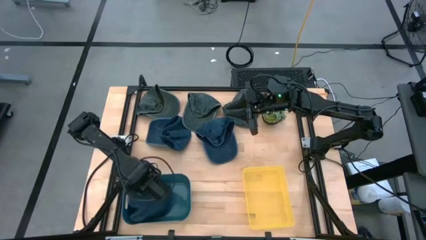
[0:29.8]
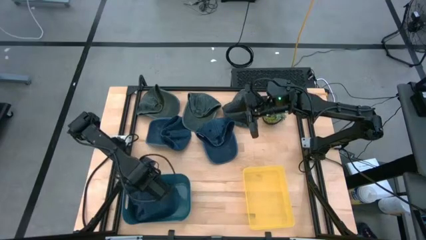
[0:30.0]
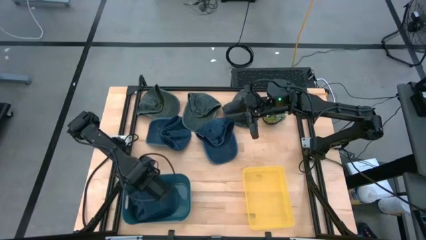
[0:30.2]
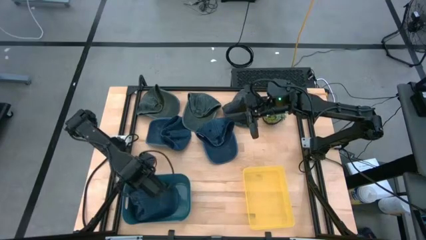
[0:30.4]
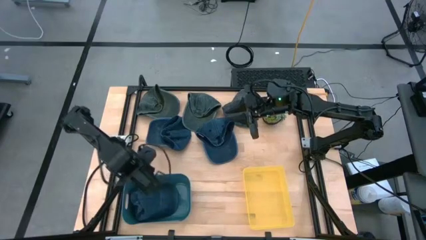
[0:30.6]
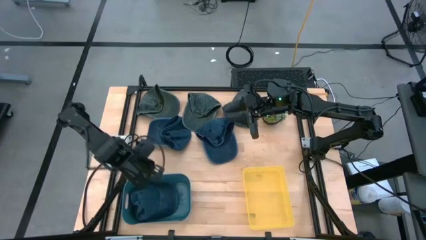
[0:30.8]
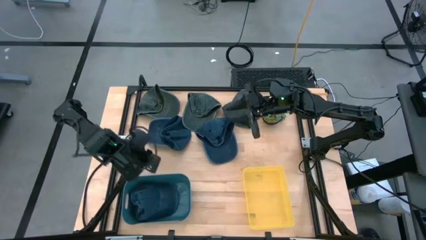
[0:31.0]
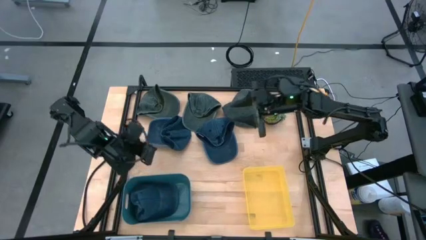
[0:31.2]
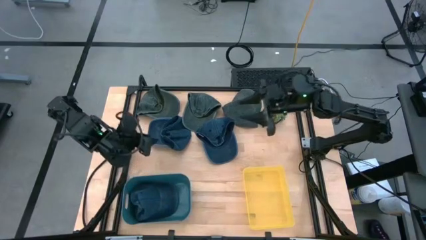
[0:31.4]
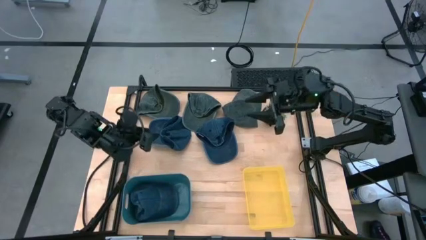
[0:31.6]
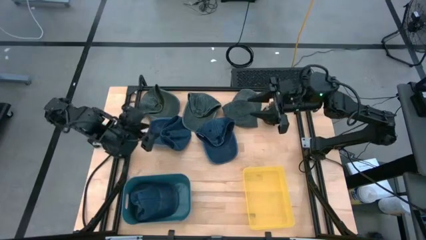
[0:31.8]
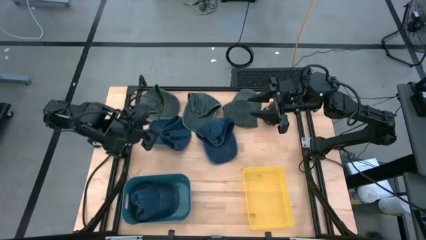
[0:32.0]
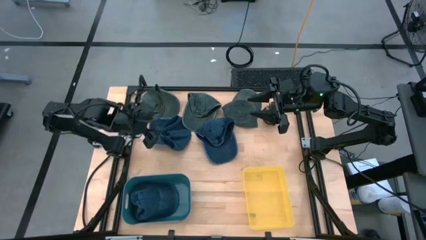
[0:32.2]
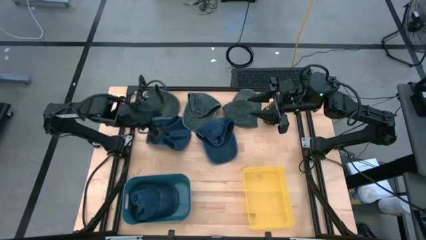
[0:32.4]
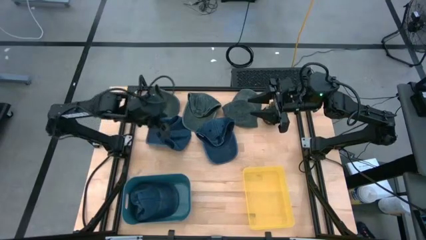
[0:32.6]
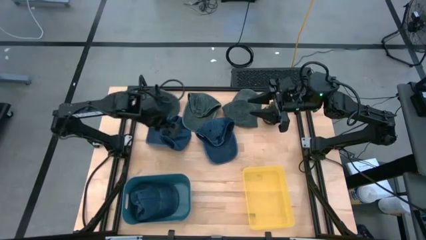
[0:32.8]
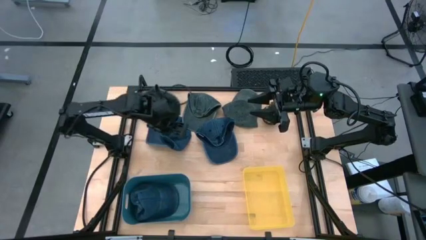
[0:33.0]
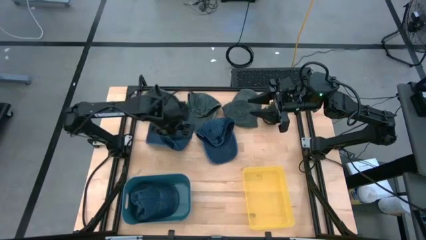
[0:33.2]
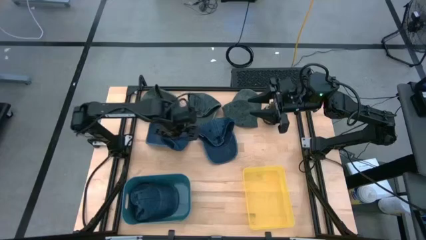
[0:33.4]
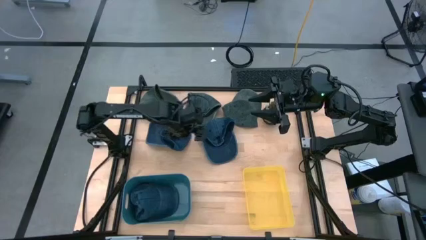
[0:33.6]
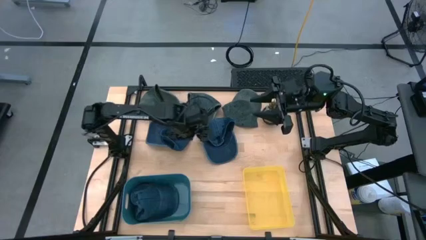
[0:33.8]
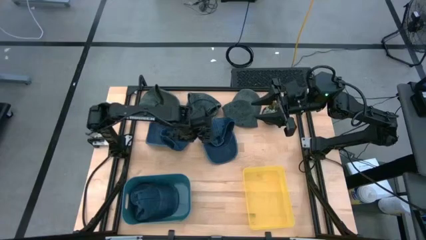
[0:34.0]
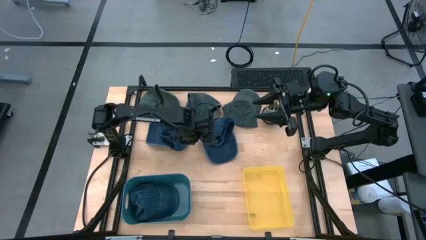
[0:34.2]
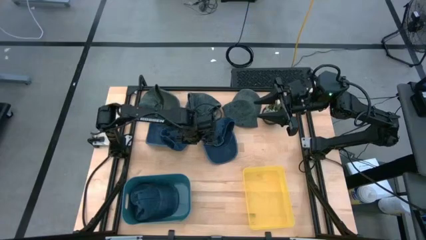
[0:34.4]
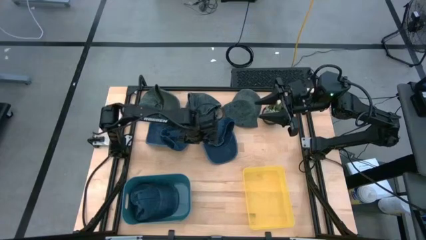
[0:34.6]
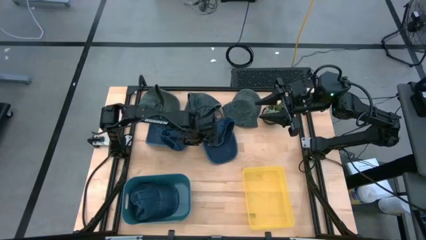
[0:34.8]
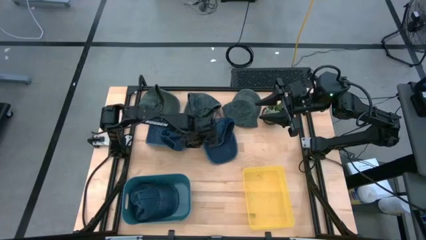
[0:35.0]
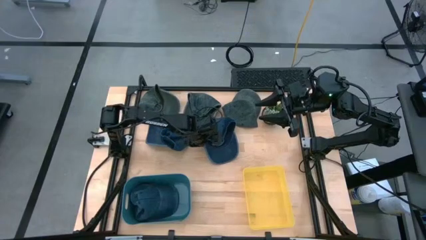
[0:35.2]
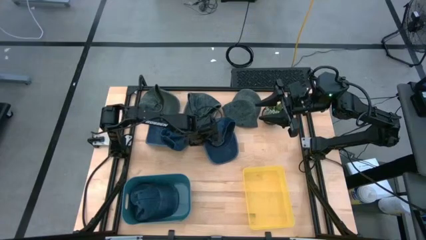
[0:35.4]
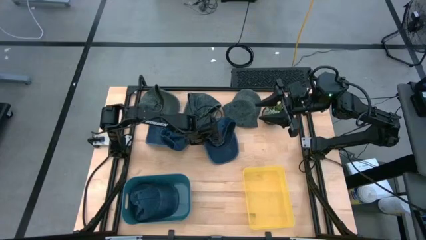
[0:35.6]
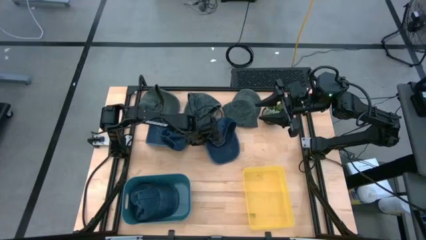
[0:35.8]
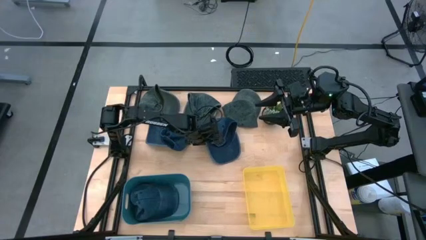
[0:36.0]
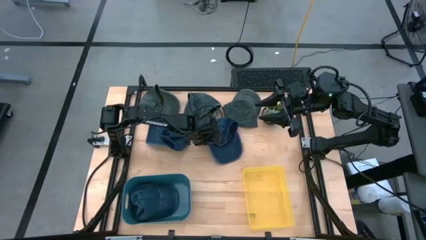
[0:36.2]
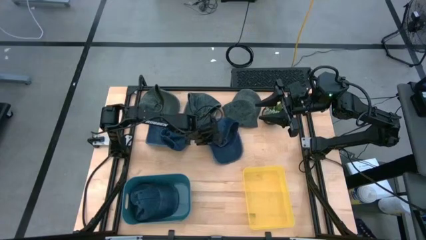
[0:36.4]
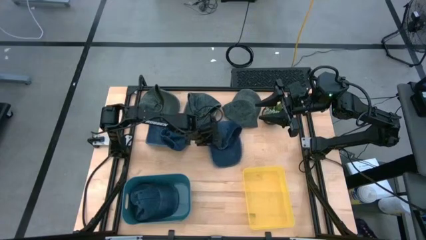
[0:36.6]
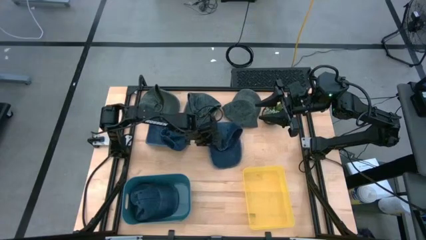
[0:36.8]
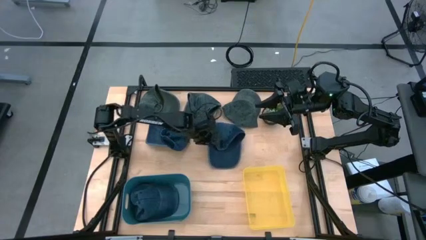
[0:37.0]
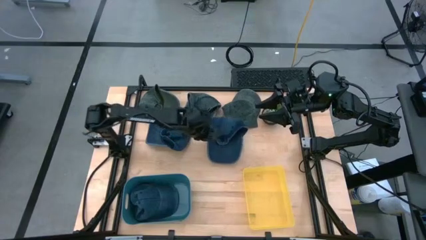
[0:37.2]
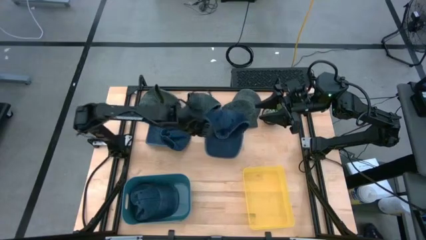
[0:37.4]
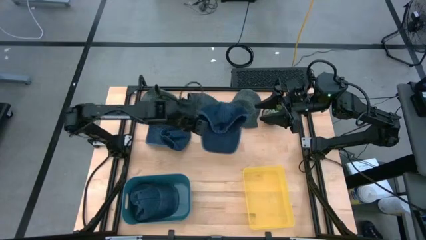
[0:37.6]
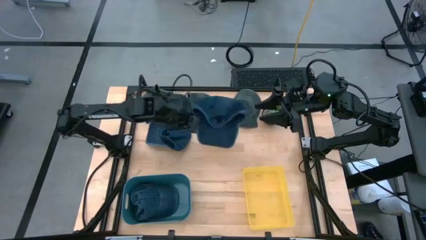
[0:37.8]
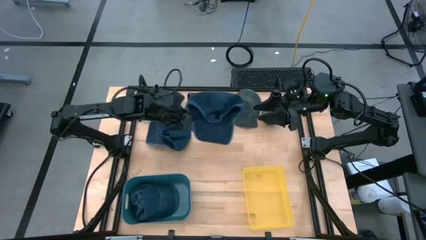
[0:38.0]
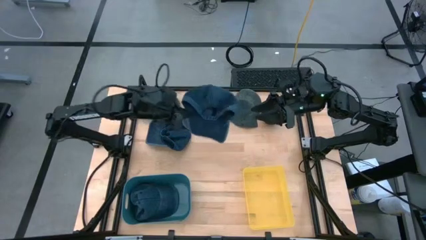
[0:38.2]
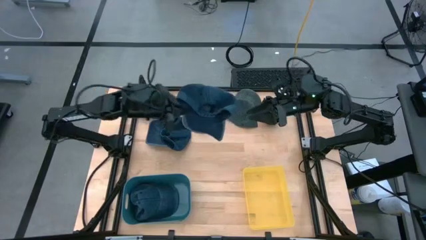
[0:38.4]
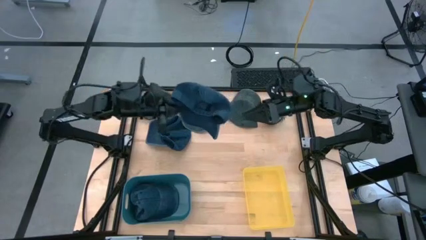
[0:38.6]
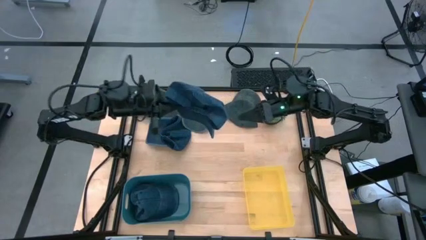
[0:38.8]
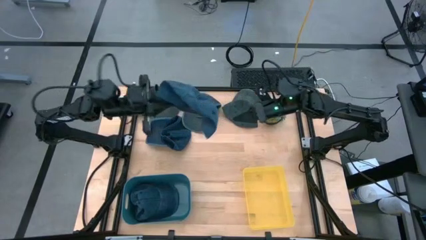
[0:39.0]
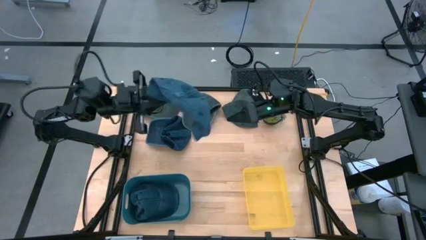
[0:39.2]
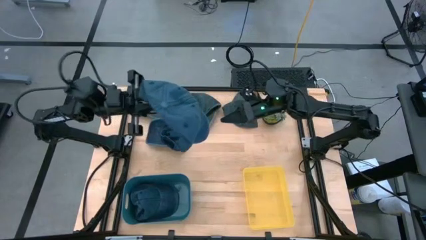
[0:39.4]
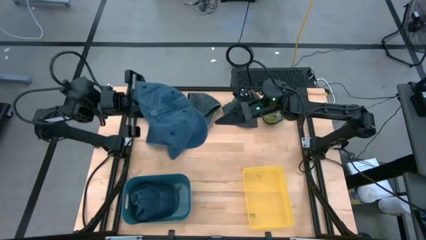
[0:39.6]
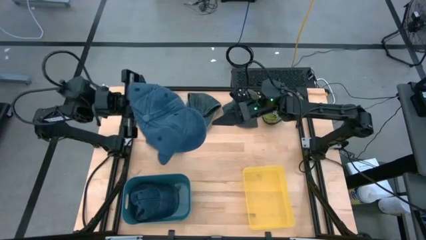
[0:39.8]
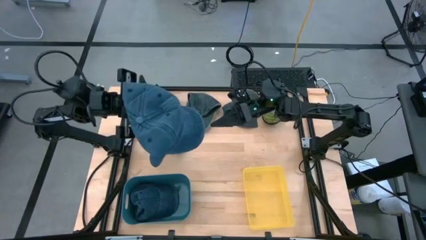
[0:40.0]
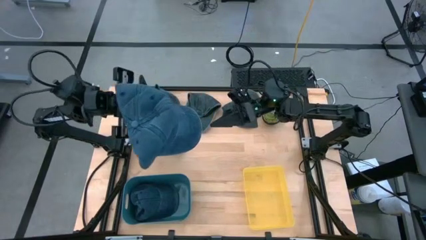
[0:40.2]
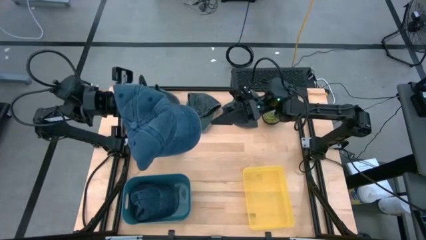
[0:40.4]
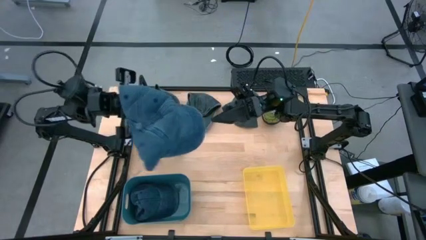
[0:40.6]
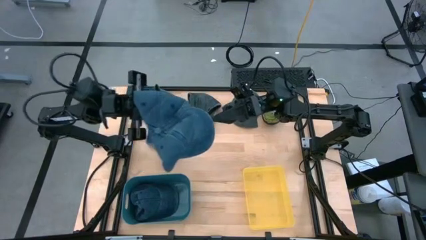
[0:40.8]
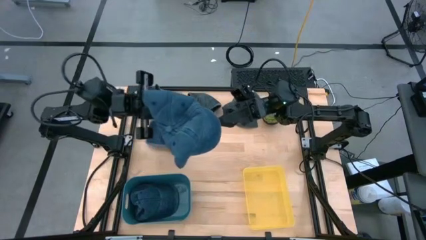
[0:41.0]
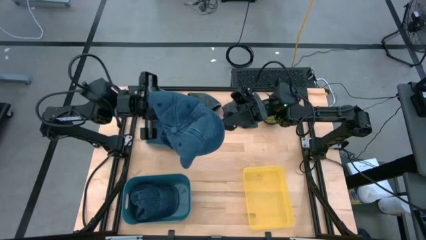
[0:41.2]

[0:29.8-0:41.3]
Task: Pick & Place hat
Put the right dark blue cap into the blue bin

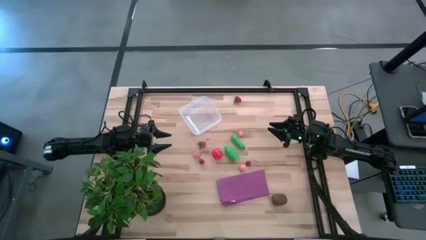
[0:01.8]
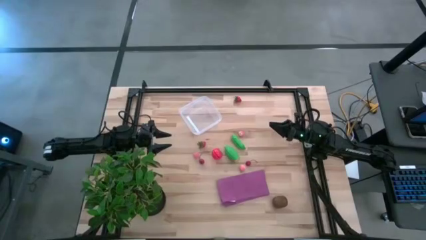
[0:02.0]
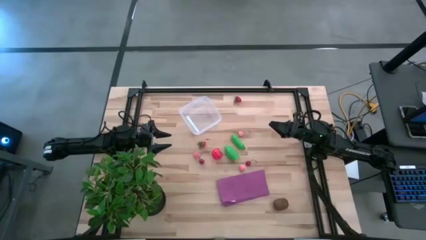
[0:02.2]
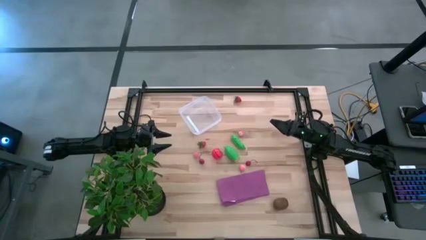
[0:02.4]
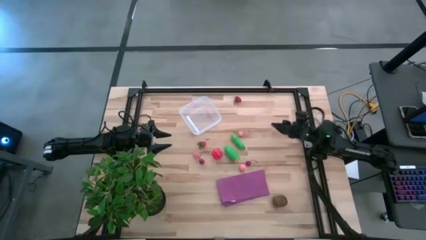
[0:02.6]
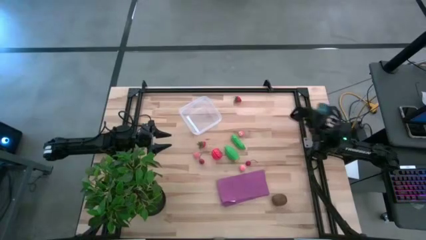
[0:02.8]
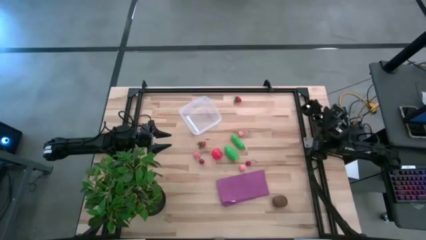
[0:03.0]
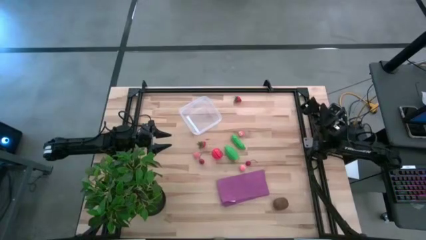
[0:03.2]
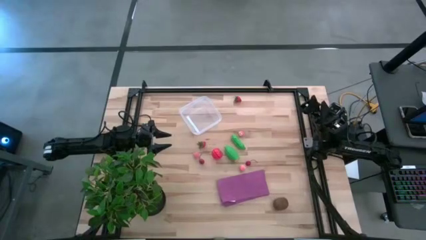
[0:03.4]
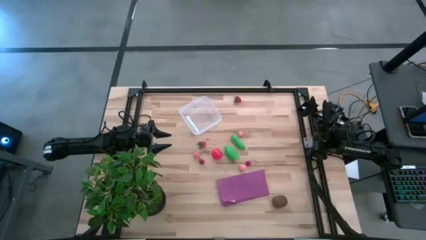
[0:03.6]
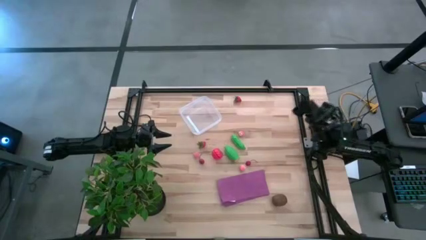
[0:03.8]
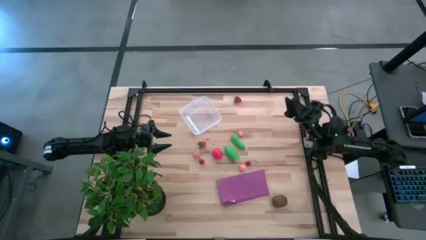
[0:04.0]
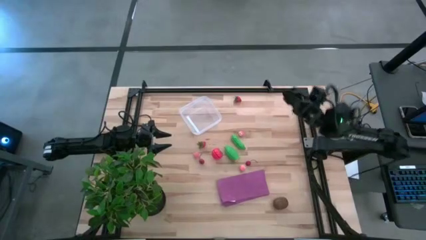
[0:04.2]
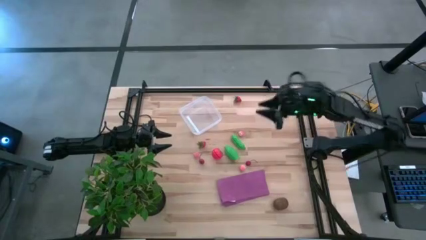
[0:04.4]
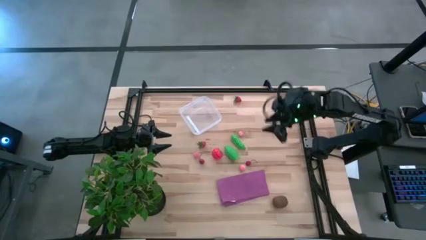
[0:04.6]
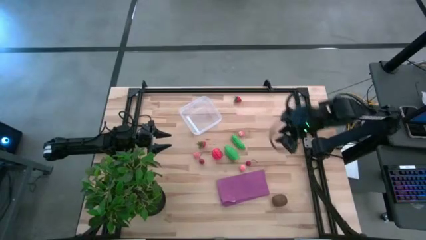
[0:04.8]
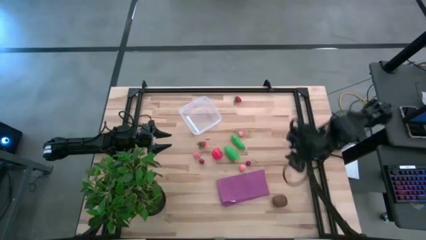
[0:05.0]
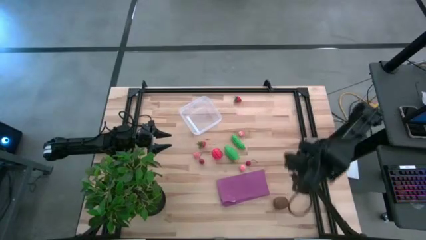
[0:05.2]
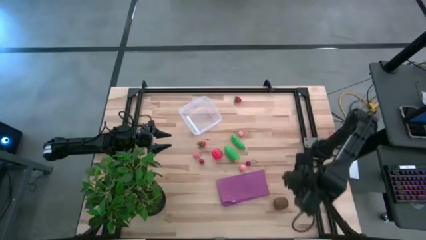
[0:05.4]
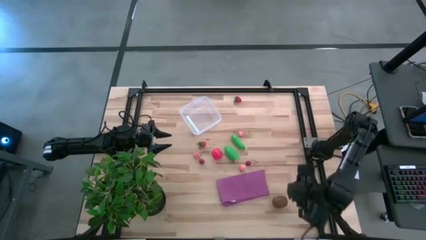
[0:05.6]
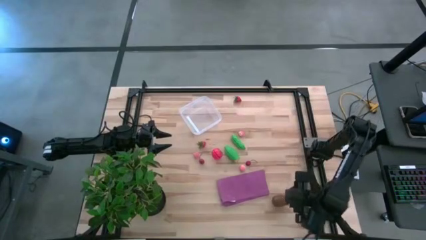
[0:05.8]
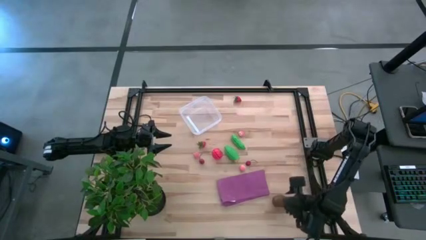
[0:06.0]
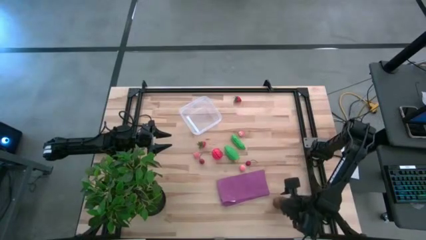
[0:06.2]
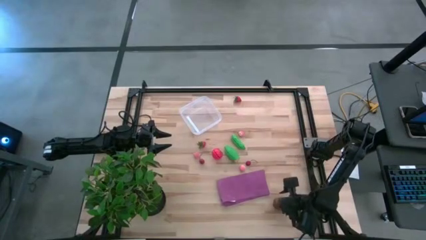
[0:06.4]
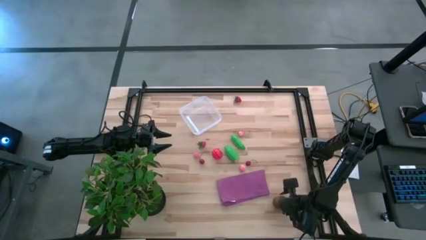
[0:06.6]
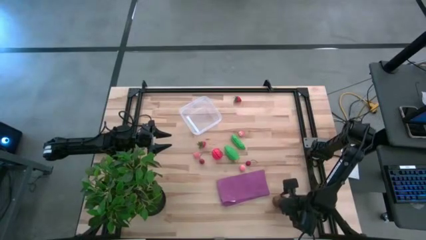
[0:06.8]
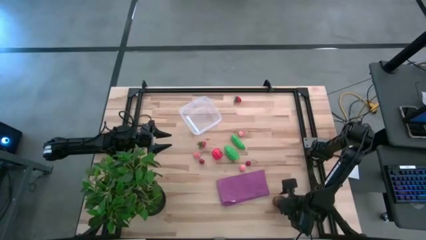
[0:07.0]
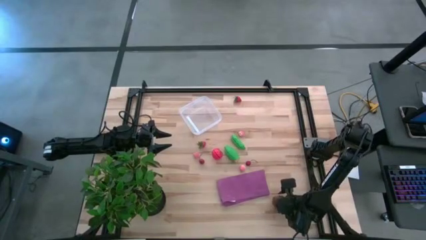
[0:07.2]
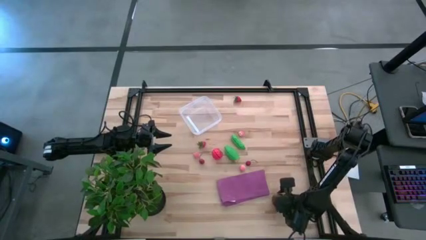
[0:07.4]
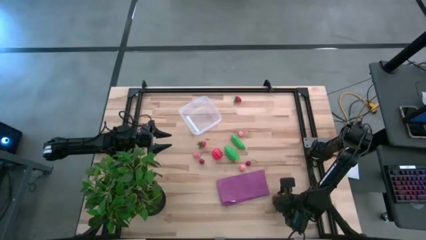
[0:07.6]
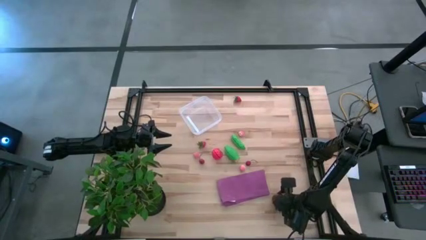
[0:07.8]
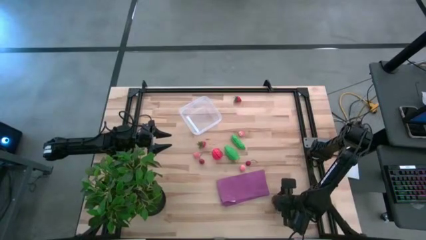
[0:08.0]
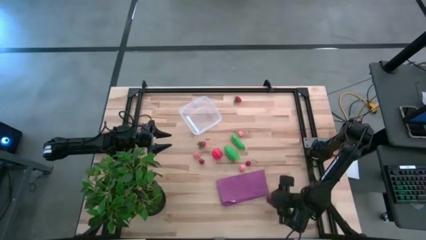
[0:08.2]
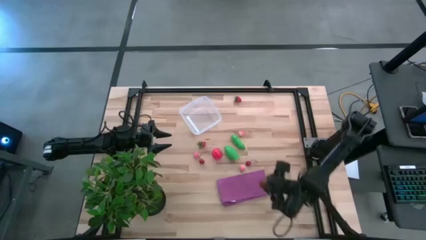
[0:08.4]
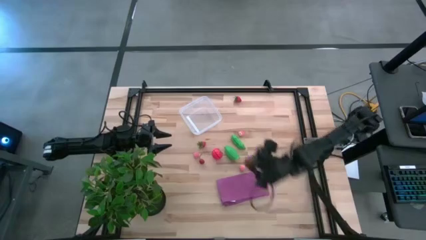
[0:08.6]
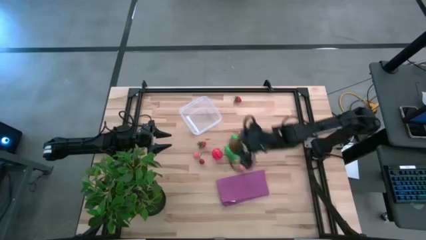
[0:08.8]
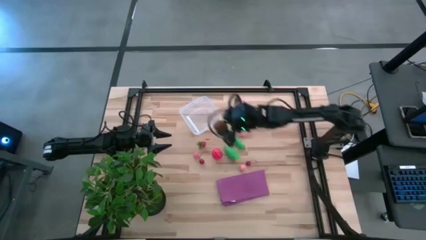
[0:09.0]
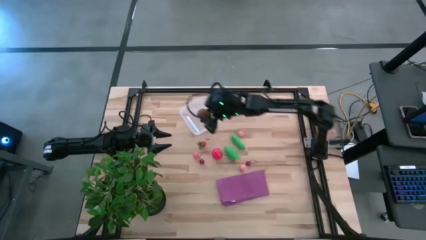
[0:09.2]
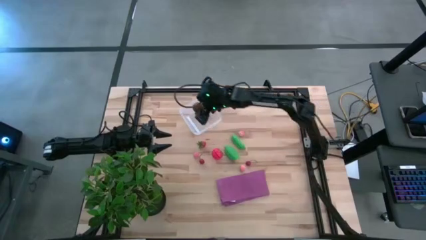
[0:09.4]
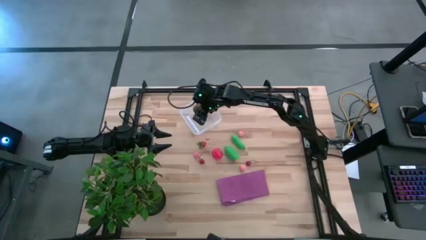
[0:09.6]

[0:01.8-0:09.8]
Task: Pick and placing Produce into tupperware
Put the brown kiwi into the transparent bin
